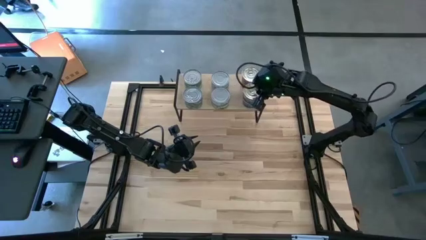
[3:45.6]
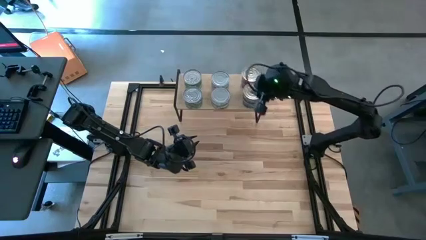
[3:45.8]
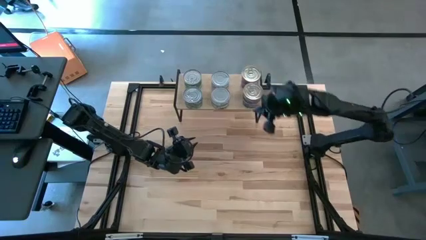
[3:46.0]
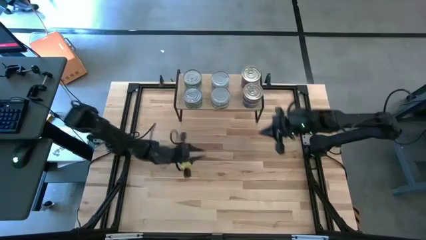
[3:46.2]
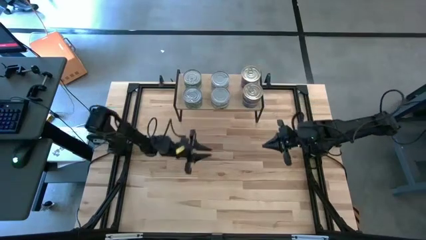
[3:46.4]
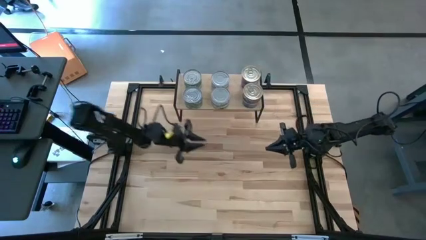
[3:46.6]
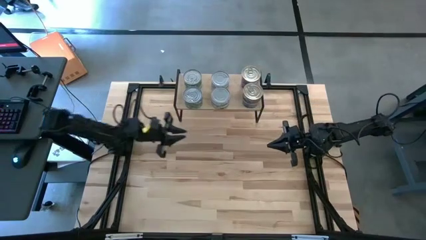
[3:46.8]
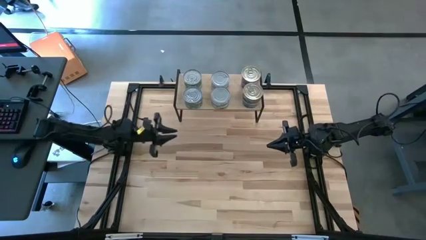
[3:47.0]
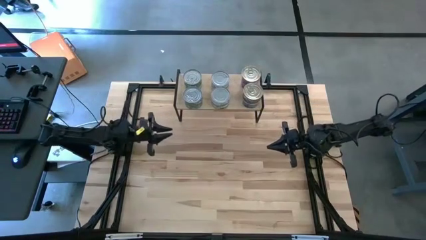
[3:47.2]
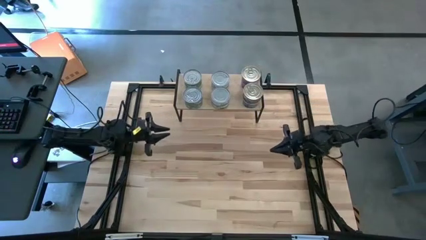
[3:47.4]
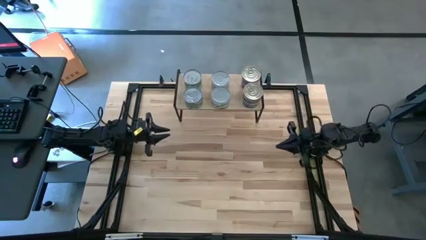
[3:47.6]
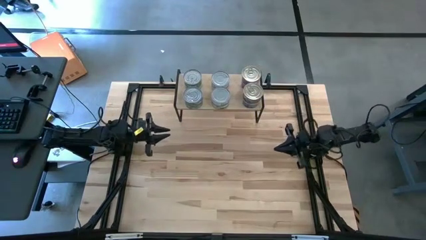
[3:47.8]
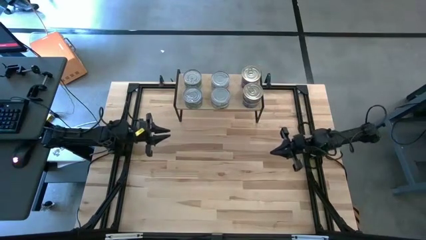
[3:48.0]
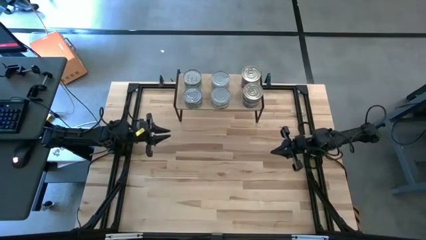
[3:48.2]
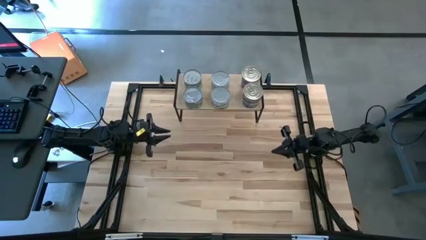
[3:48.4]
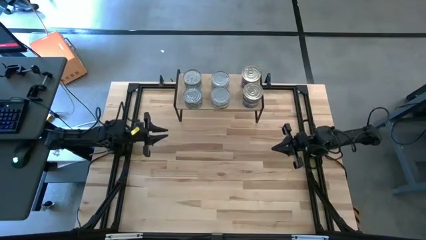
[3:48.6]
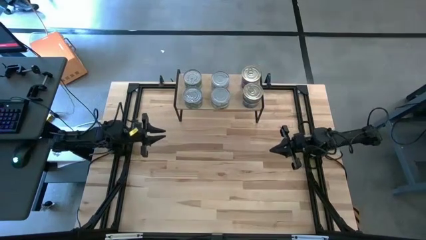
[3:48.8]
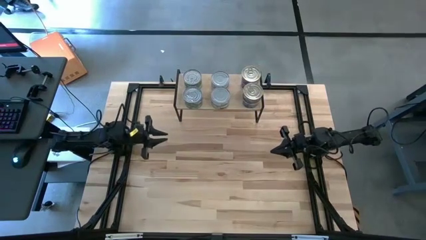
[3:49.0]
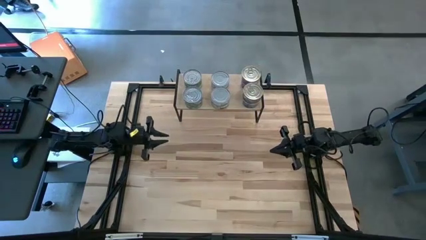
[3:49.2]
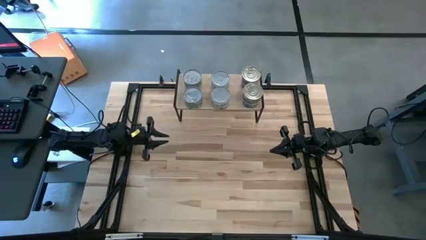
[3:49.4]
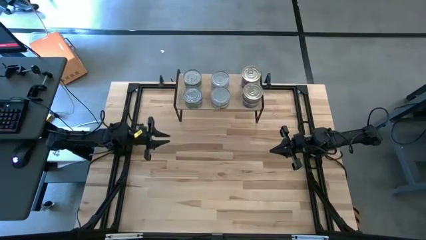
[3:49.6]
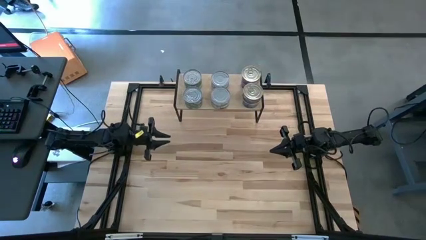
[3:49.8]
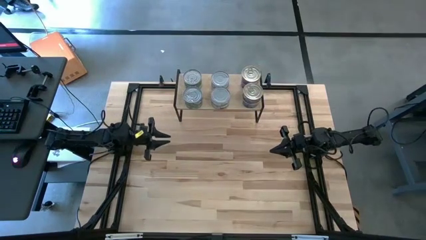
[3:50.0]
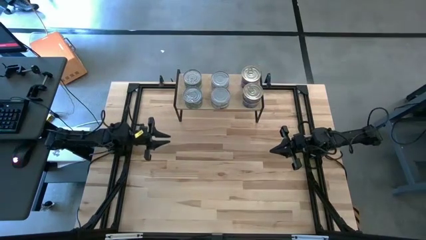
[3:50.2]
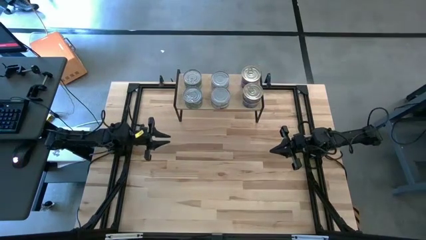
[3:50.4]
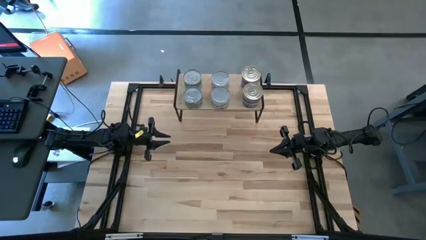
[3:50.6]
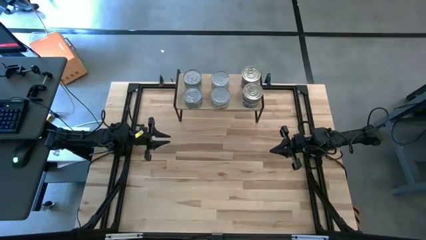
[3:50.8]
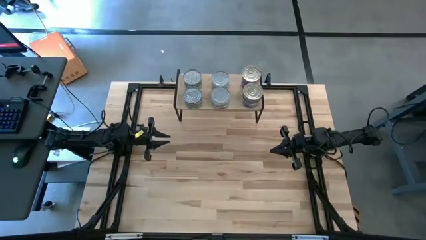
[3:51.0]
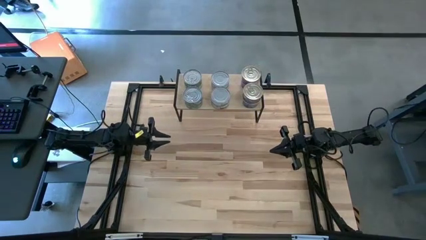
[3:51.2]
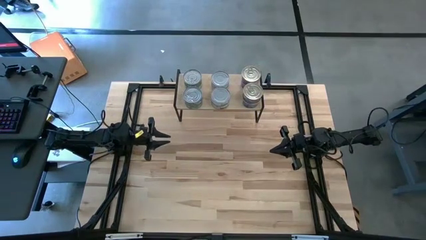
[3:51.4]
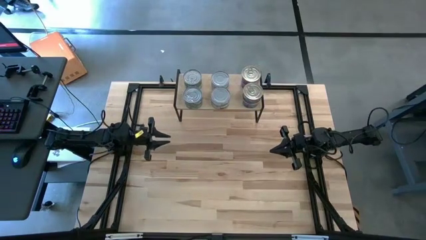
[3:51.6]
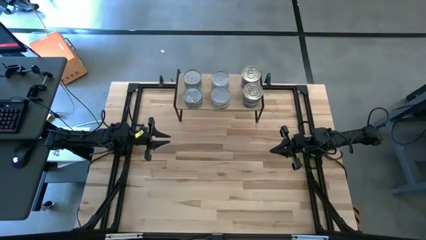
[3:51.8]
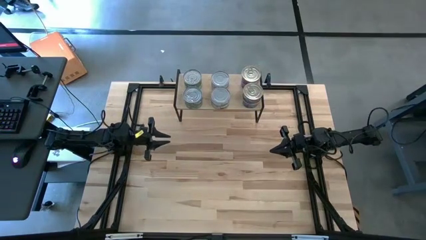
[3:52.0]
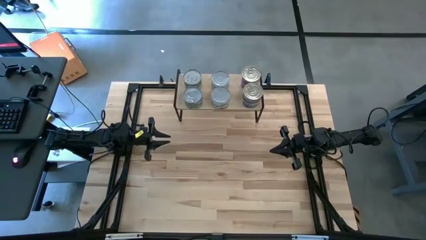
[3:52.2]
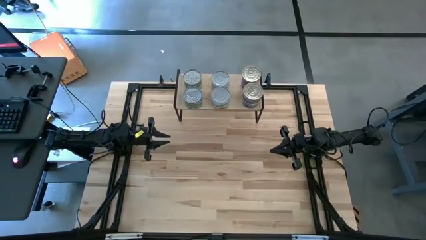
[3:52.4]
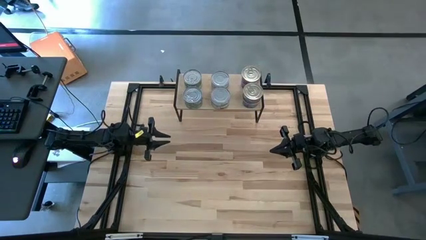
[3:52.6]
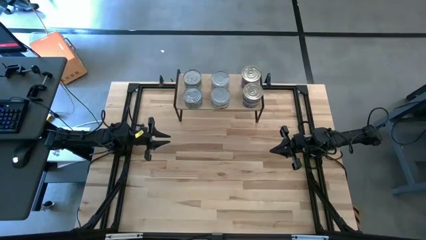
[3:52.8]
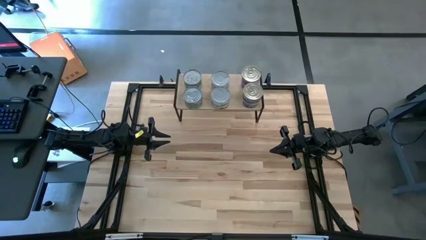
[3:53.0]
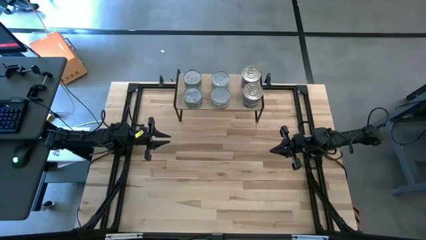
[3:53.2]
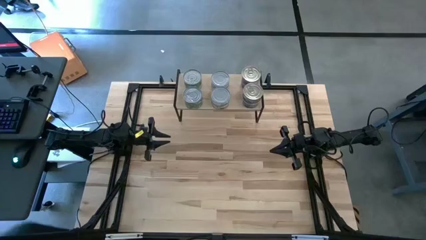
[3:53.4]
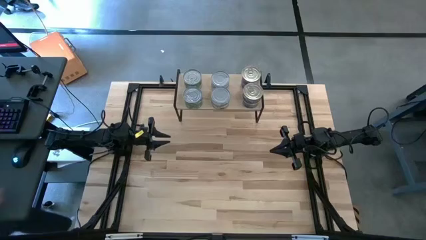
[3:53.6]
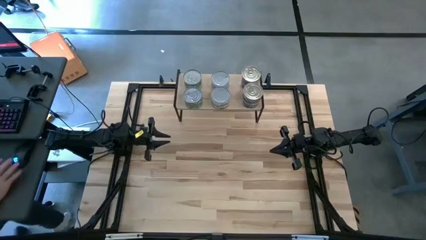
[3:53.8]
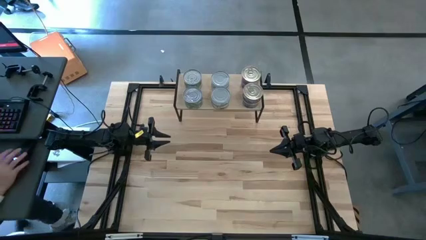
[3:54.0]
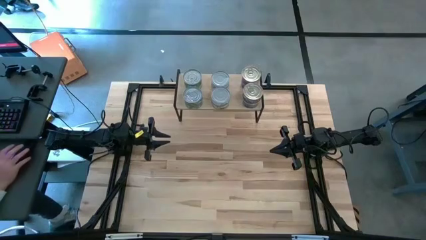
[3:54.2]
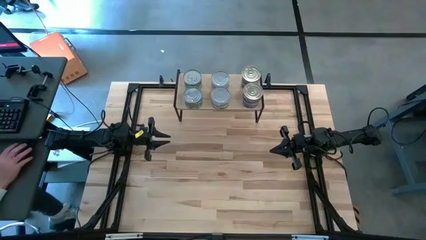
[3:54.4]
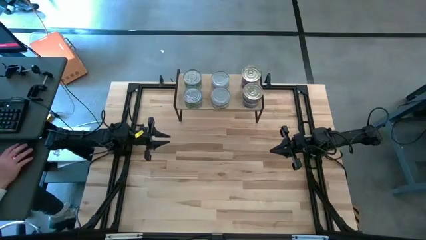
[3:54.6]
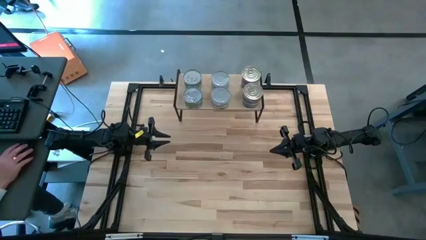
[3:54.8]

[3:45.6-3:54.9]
Task: Stack canned seafood by type on shelf
Return to Home Position

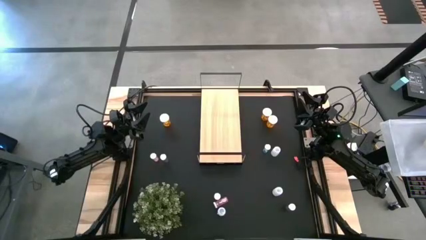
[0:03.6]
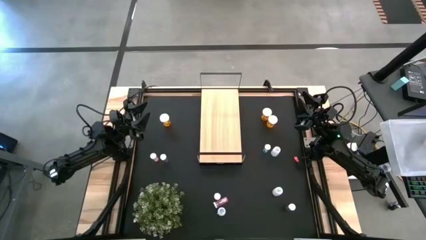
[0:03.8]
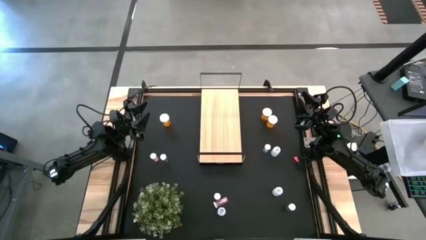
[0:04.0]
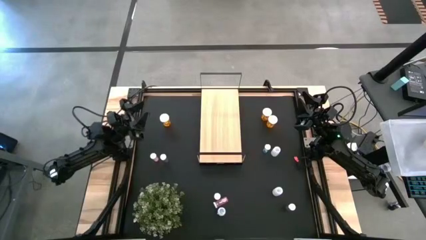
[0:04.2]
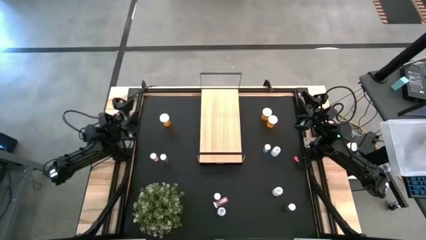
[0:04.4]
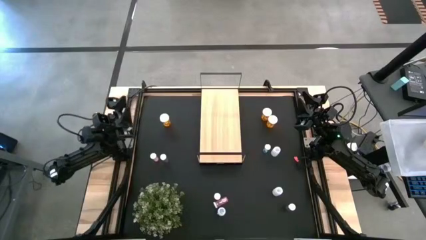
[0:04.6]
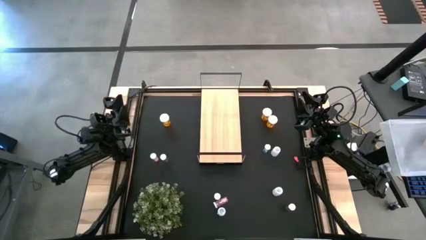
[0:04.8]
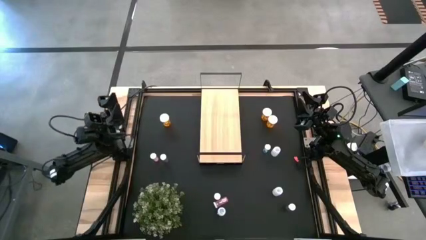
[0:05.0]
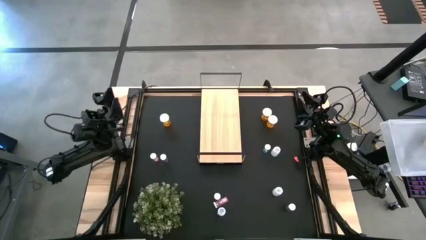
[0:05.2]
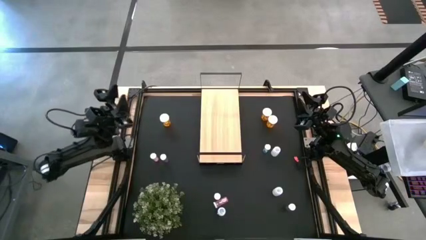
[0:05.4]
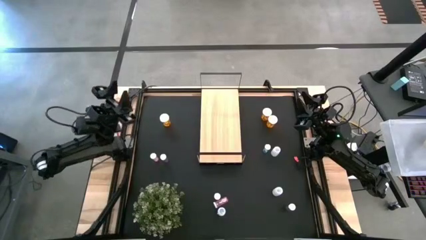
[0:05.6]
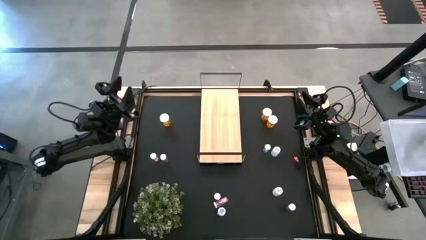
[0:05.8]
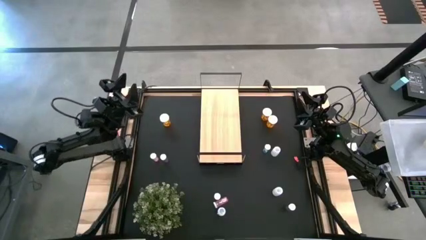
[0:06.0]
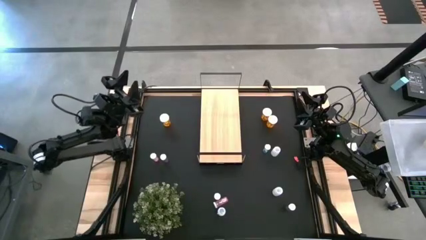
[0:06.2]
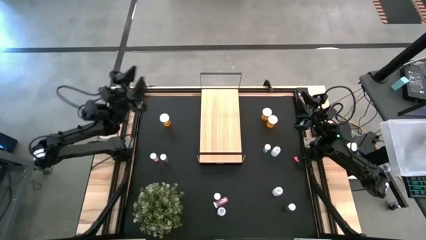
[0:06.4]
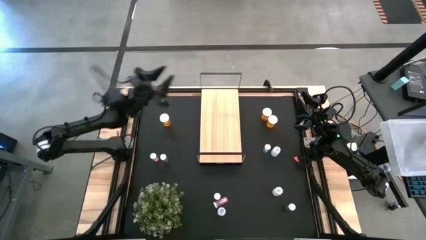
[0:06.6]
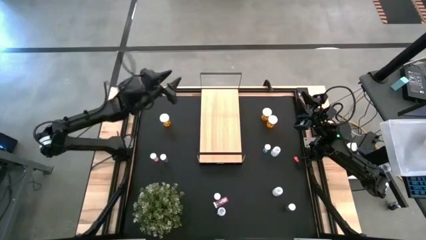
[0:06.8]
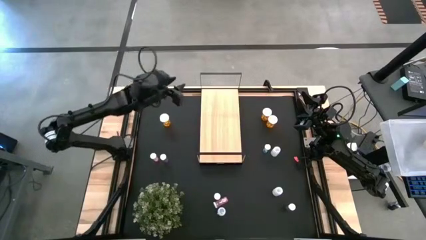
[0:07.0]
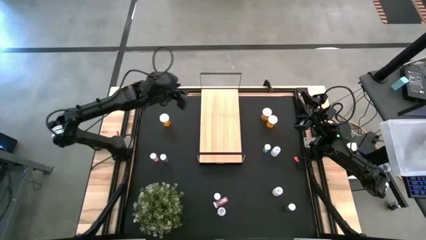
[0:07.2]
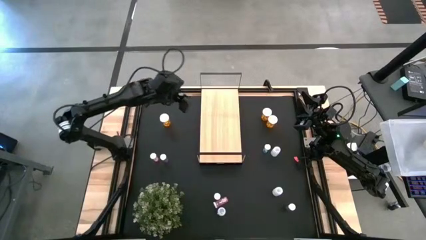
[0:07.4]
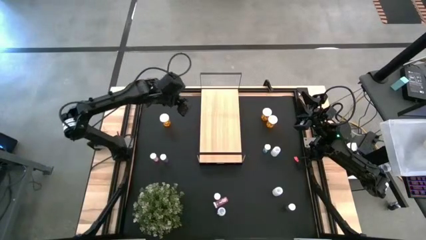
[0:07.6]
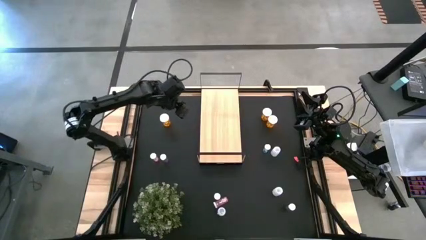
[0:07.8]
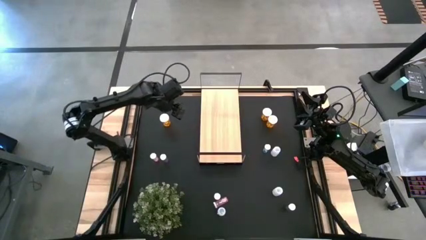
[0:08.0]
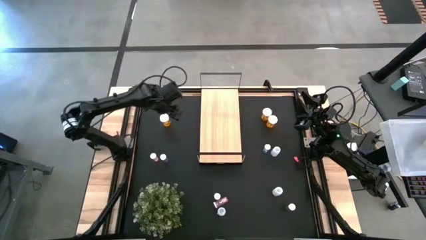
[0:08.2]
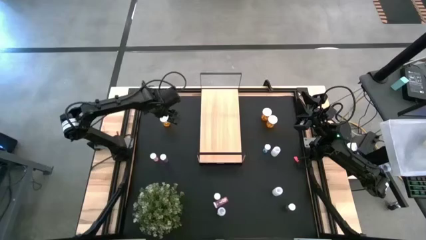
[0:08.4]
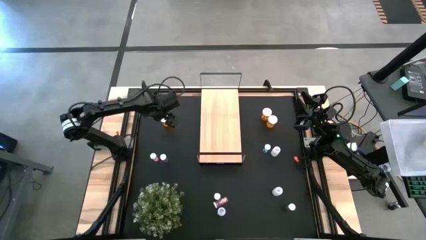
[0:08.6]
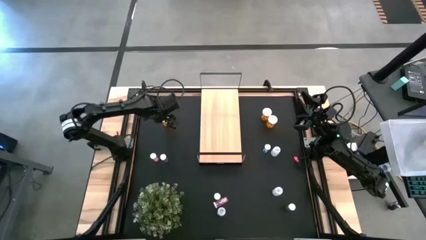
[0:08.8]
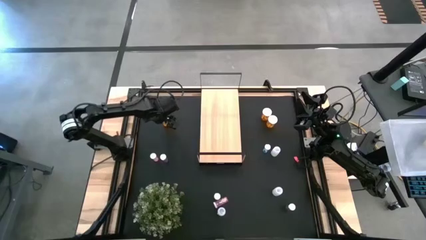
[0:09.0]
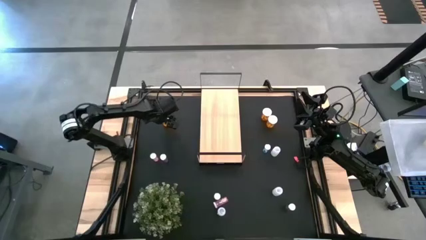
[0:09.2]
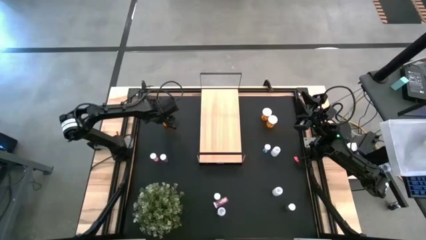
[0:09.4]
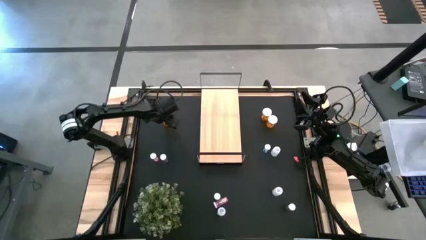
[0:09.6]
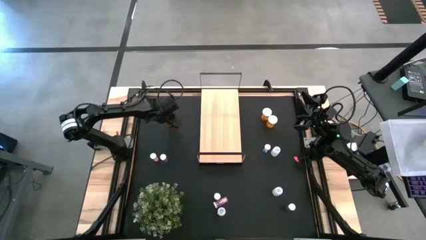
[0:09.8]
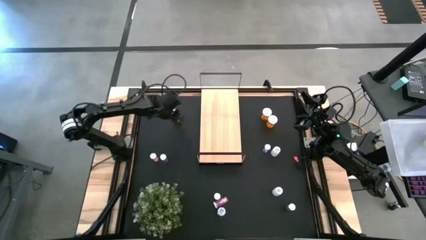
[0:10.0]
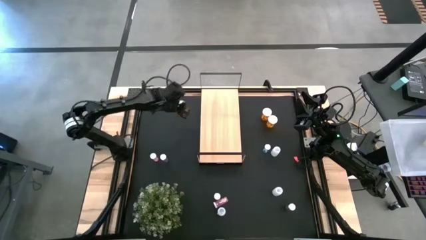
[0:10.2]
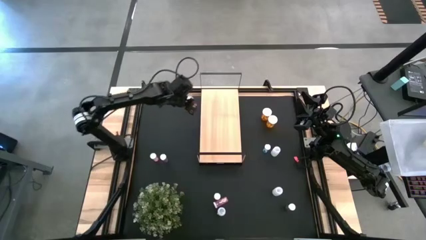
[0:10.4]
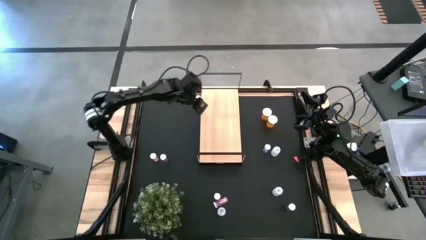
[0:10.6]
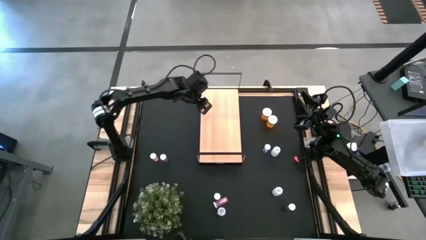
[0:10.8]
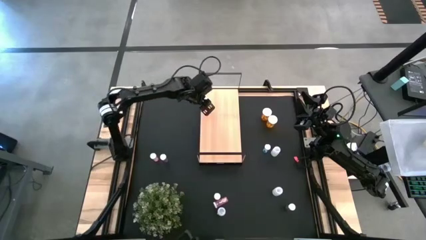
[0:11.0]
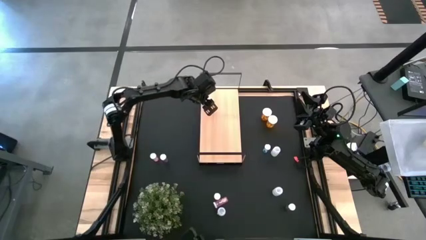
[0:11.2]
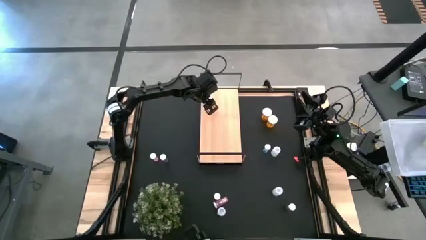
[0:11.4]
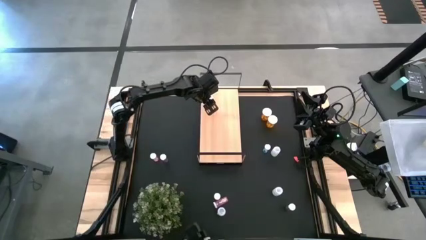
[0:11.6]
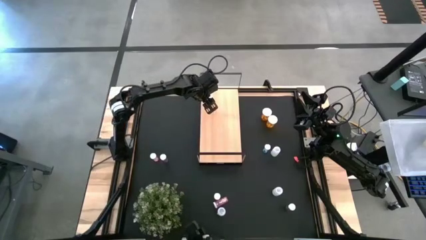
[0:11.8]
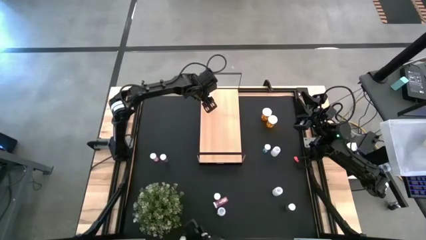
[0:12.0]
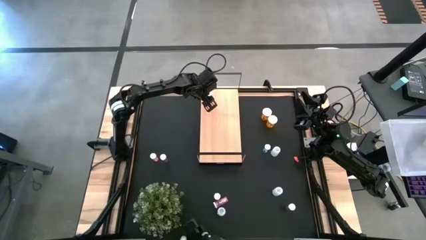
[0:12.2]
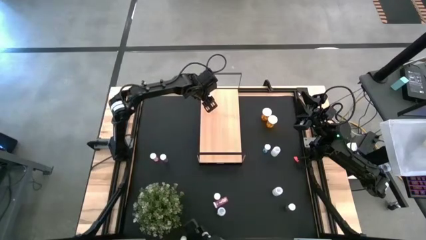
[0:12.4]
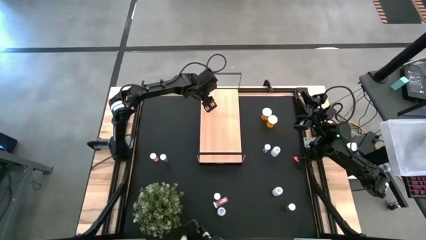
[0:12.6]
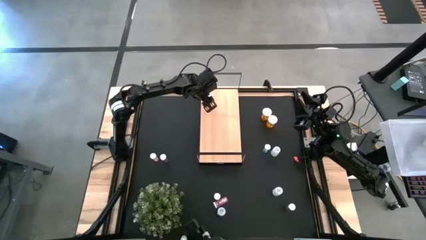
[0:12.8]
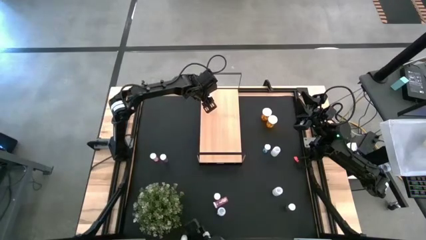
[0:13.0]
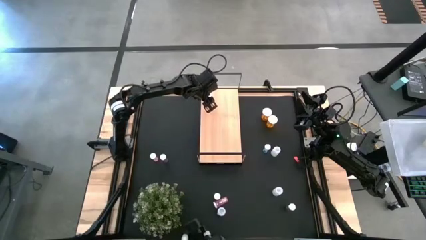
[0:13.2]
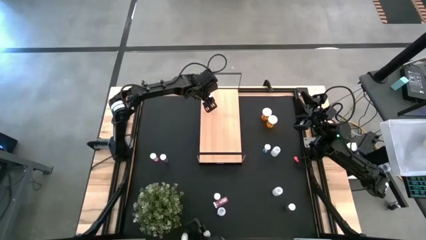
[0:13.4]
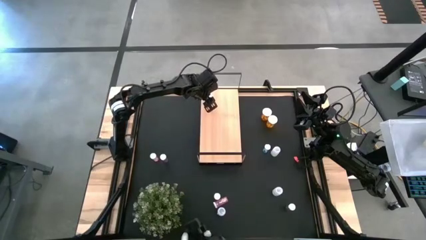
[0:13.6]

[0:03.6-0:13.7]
Task: Pick and place medicine bottles onto shelf by color
Put the bottom left orange pill bottle on the shelf
